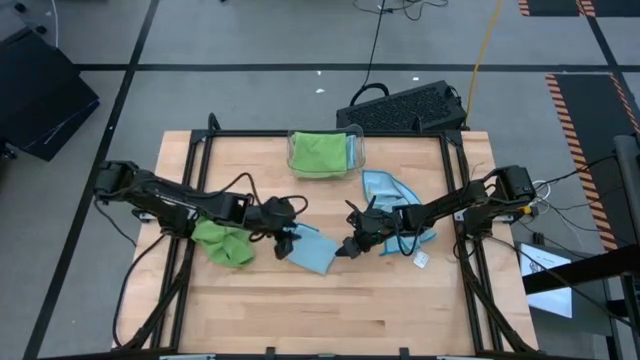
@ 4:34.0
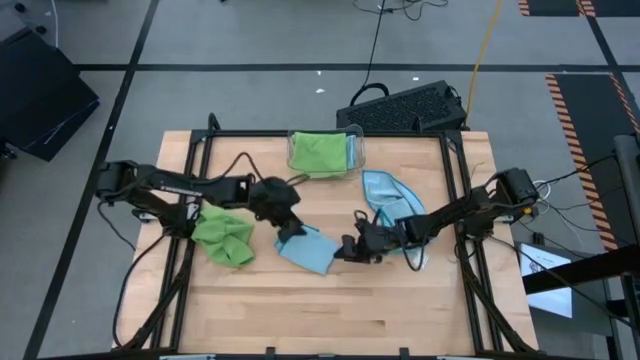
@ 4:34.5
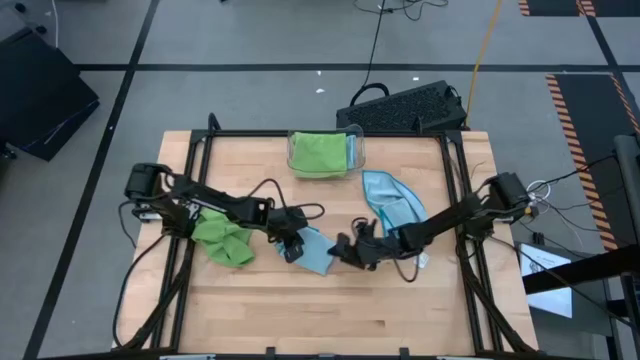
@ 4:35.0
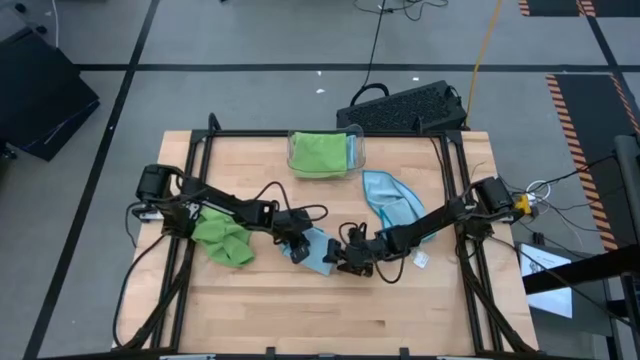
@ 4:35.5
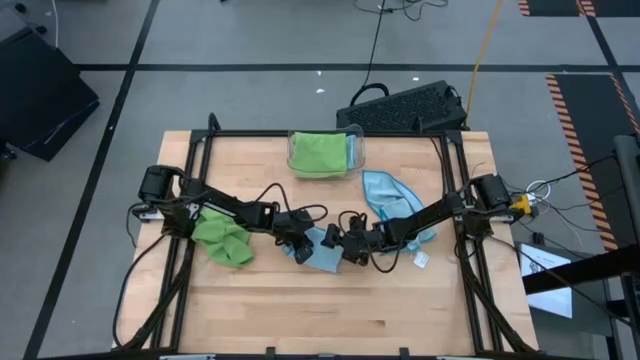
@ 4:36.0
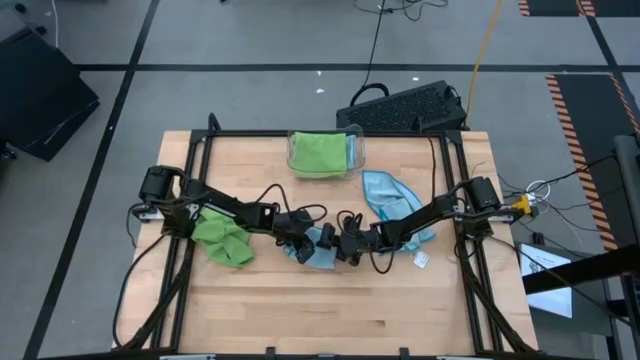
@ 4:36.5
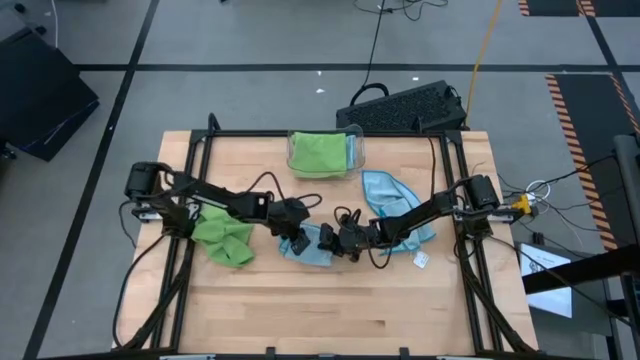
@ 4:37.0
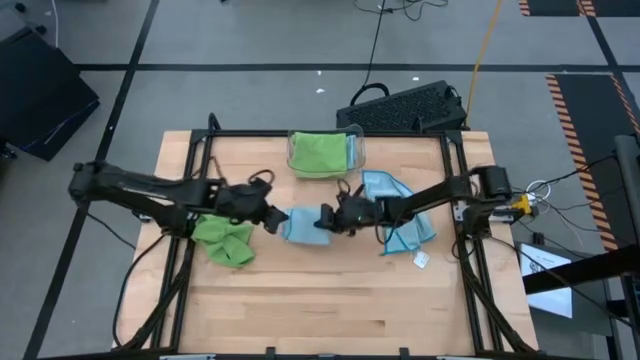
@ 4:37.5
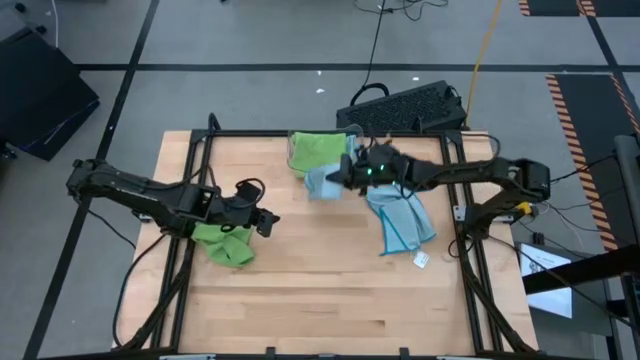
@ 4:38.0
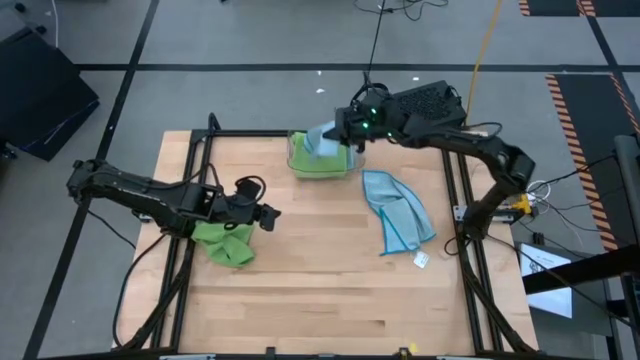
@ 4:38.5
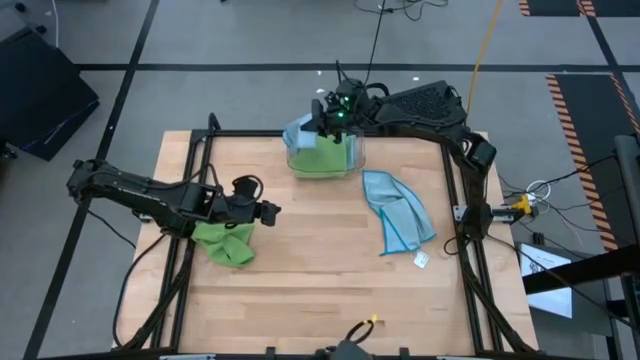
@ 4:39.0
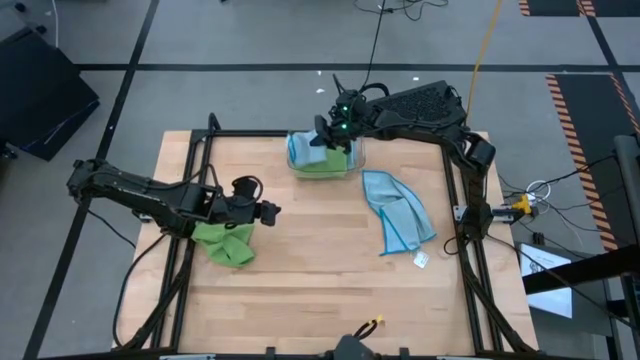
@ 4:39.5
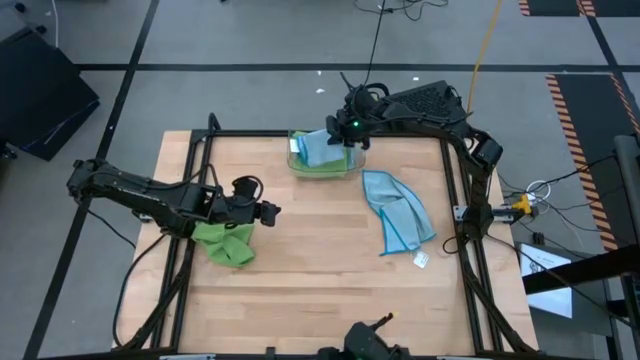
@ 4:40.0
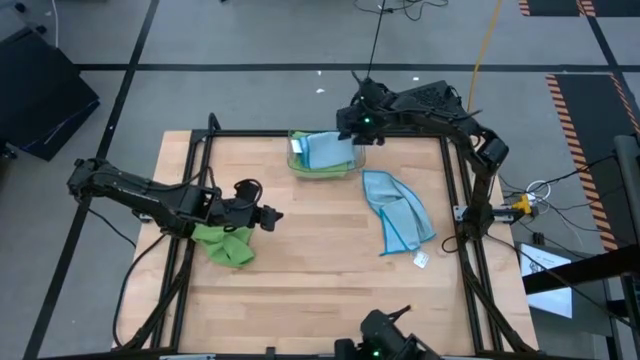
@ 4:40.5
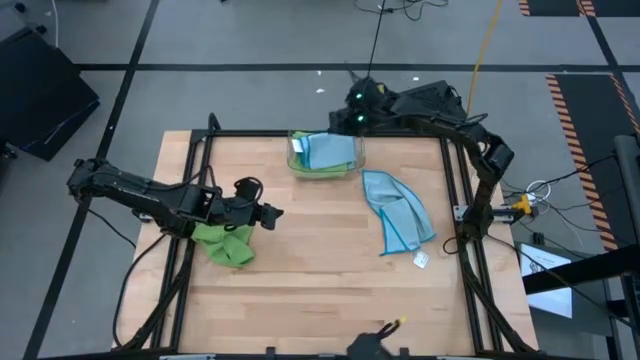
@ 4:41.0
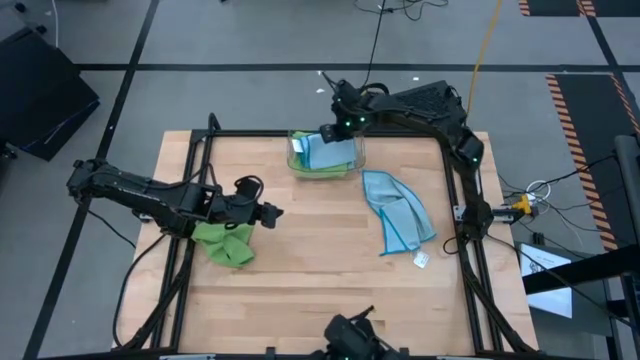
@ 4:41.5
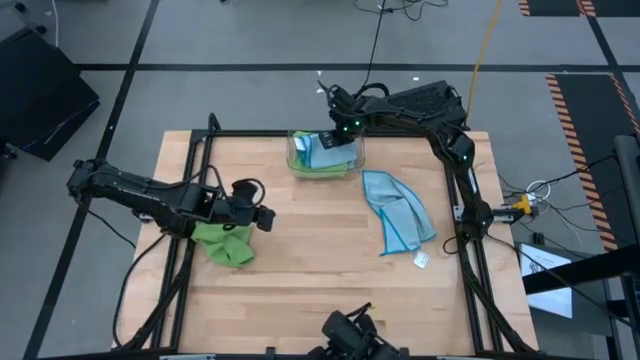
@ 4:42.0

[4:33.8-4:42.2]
Task: Fold microfiber towels
Put the left folded blue microfiber cloth into the transparent bin

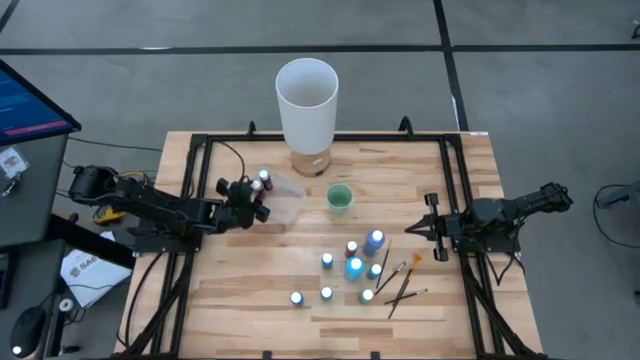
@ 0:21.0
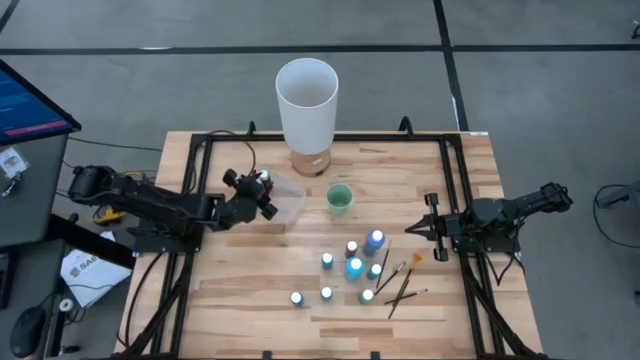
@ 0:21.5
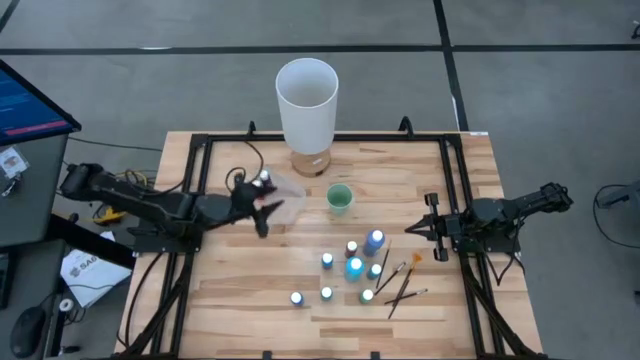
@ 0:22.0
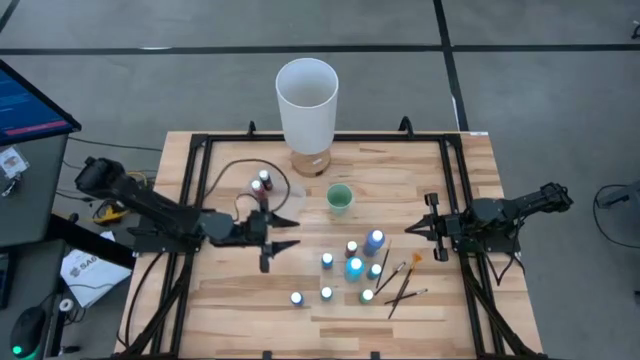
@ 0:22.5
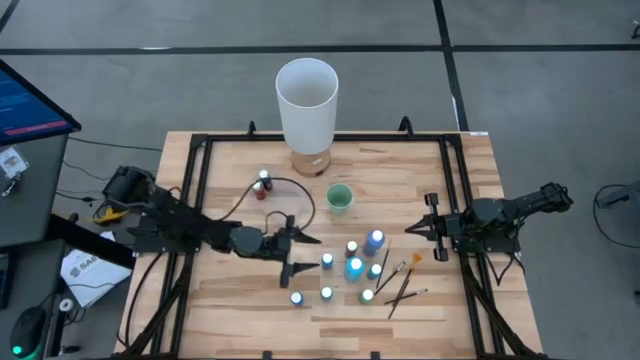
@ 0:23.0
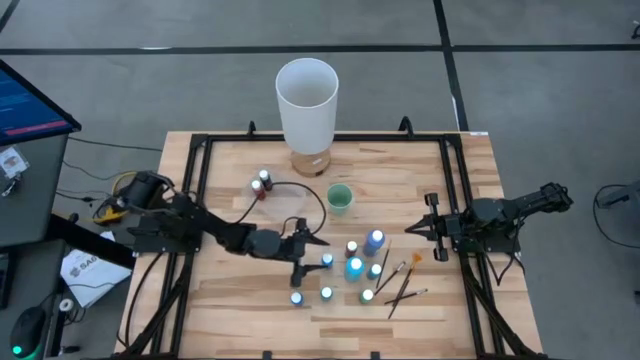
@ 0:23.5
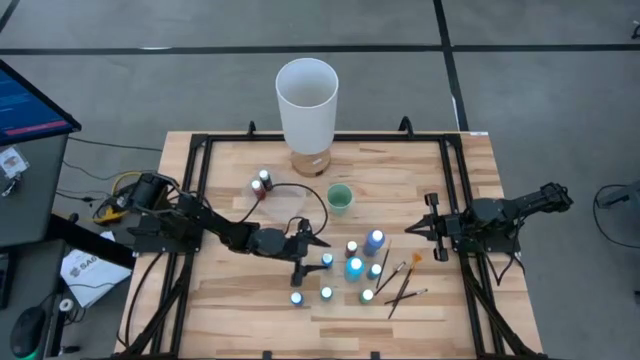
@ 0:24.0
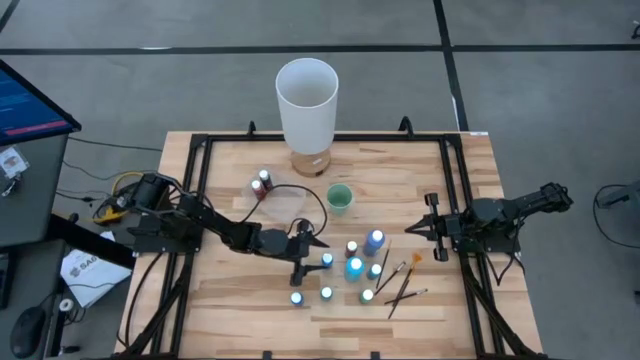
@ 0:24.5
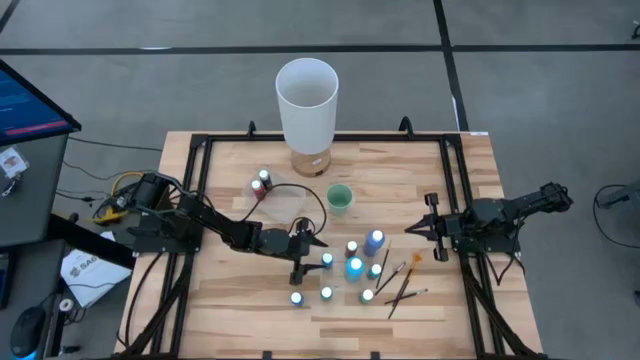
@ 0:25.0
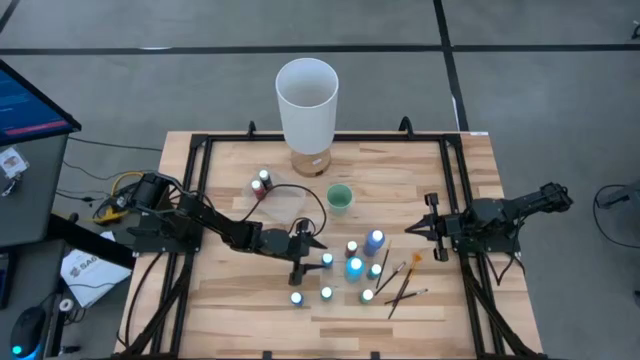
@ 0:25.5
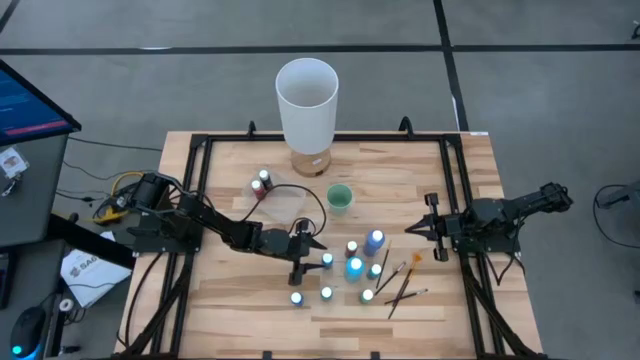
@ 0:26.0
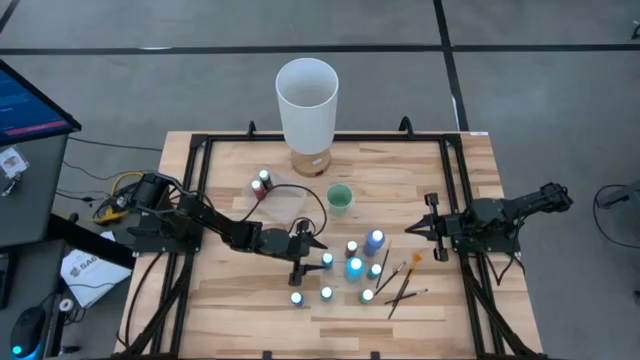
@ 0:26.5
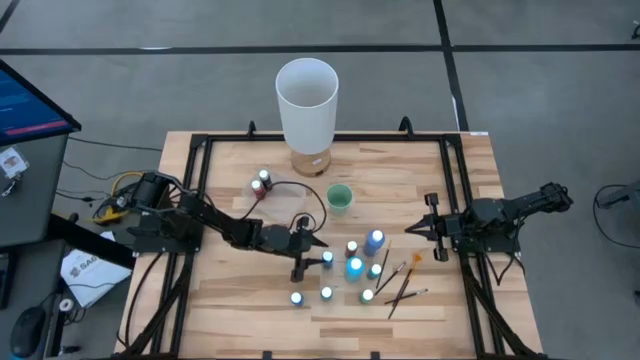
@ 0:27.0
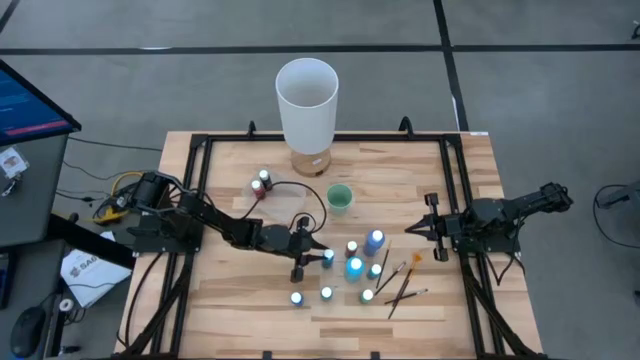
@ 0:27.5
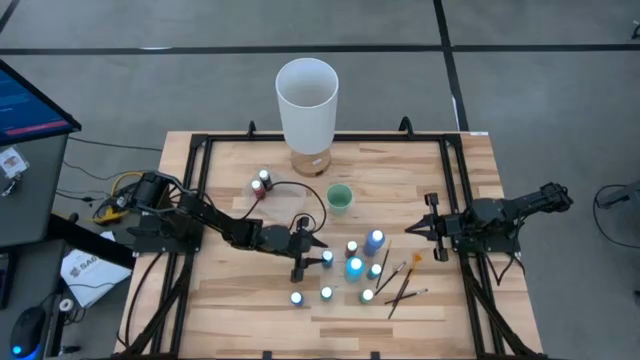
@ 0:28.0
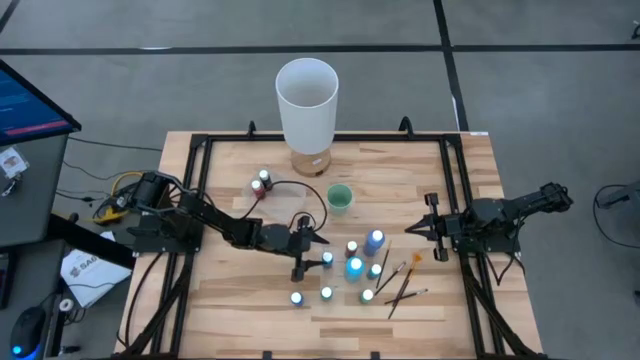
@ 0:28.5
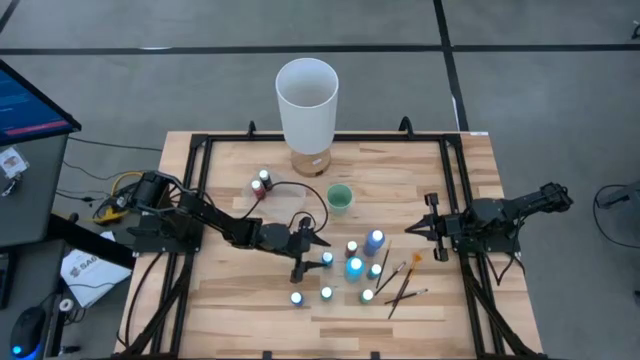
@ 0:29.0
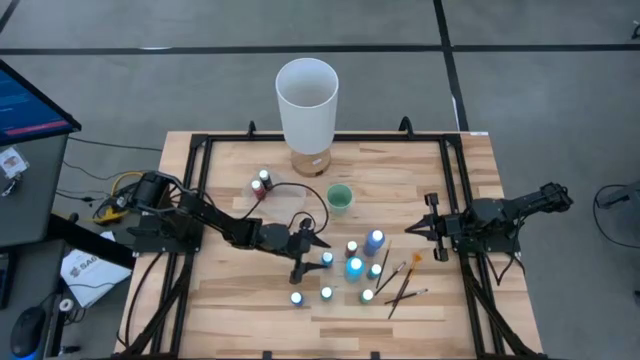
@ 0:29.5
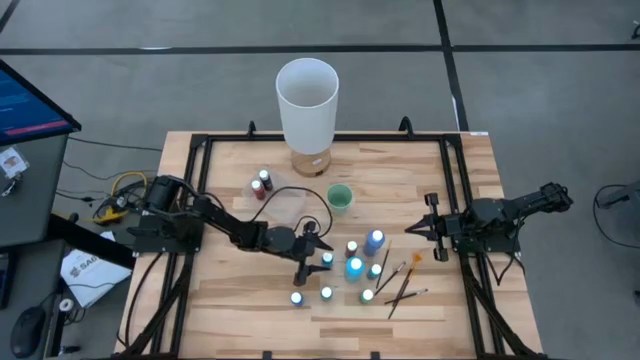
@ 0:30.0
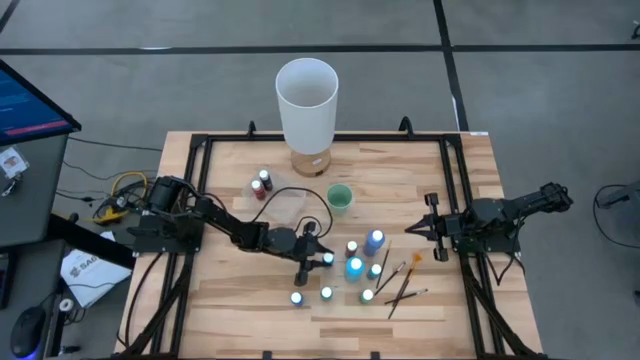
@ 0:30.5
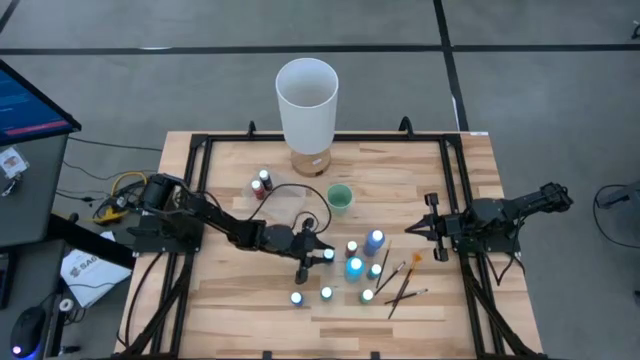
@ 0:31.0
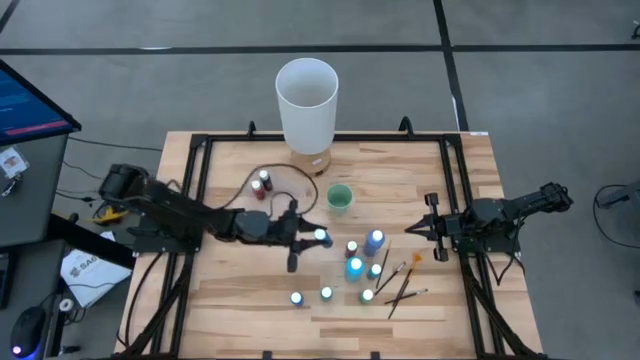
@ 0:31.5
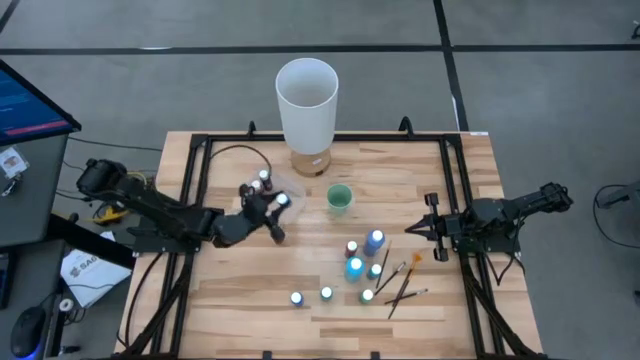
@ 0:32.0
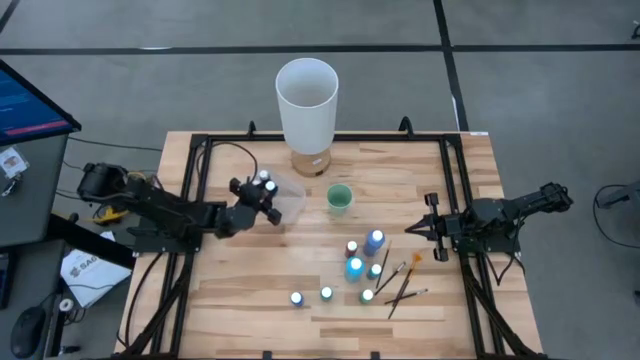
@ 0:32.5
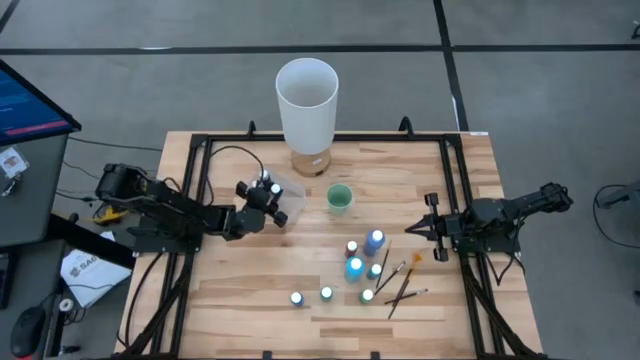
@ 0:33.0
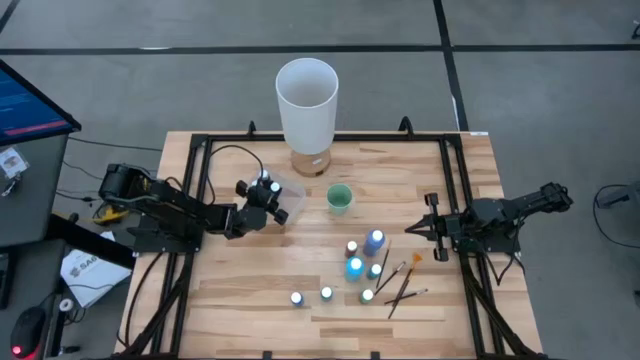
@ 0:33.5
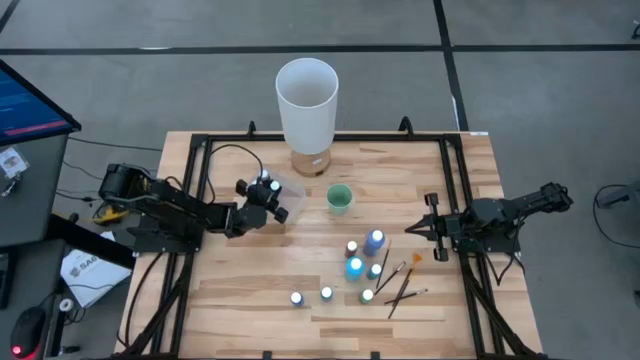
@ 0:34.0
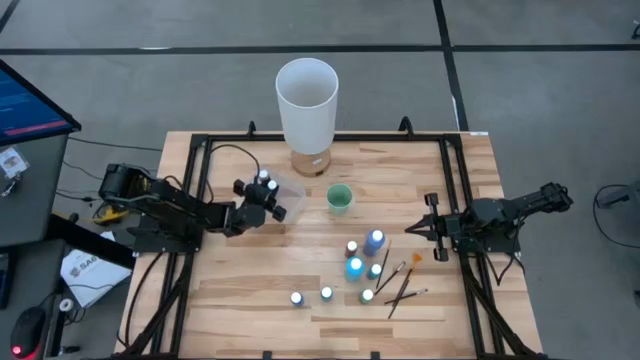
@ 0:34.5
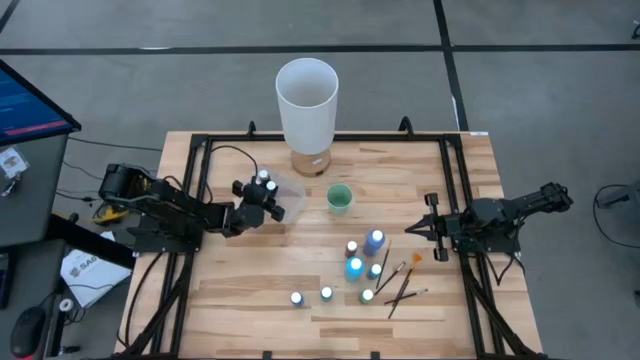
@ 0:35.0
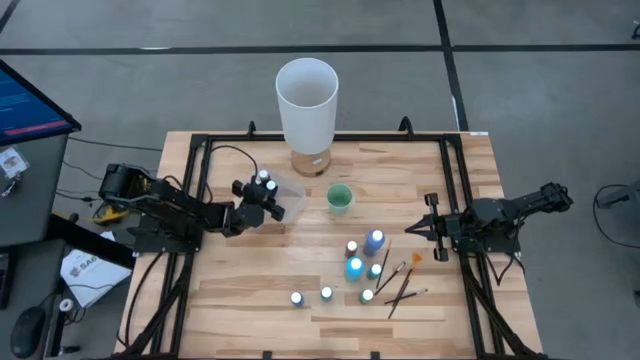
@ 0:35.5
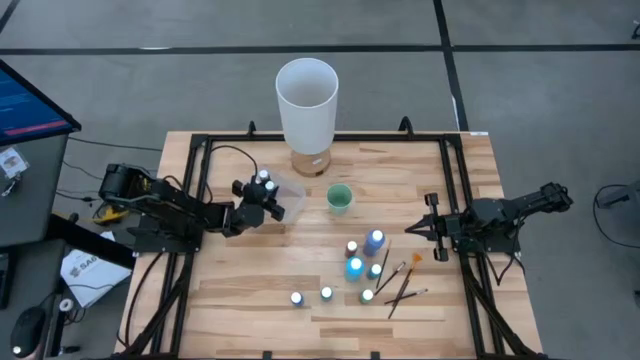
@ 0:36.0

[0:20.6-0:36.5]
Task: Pick & Place Paint Supplies
Put the top blue paint bottle into the transparent bin
